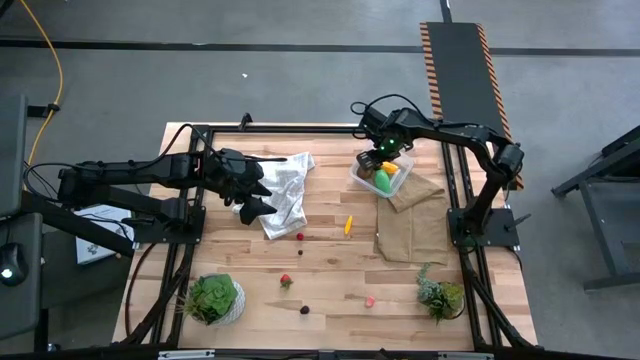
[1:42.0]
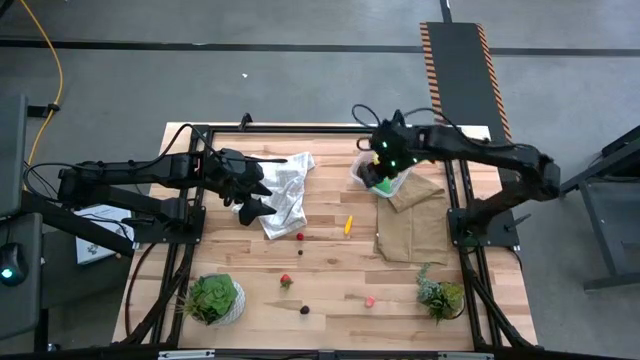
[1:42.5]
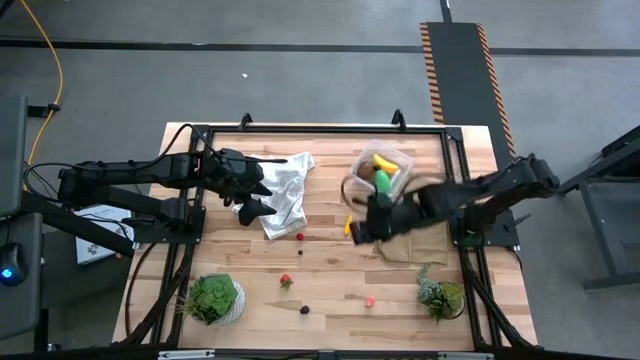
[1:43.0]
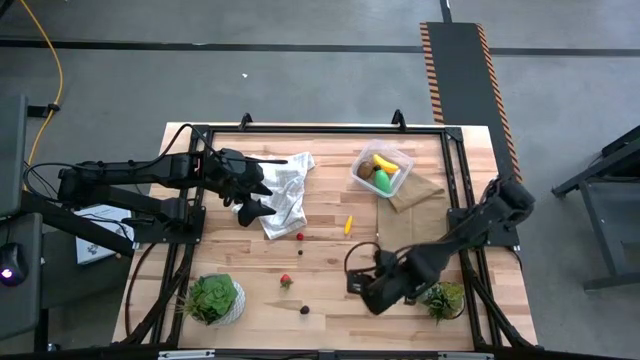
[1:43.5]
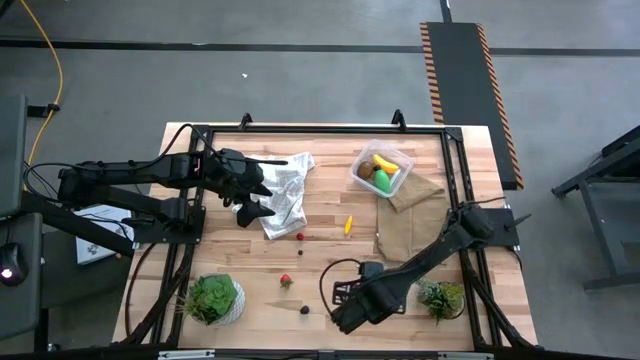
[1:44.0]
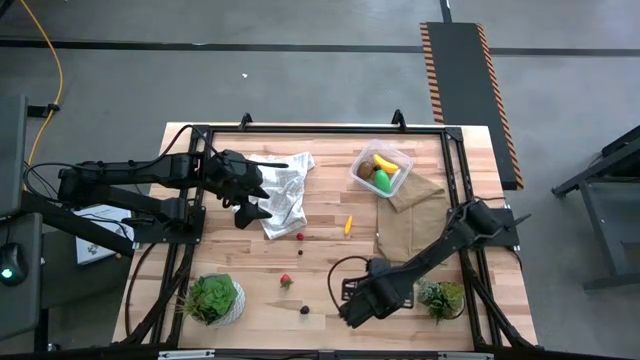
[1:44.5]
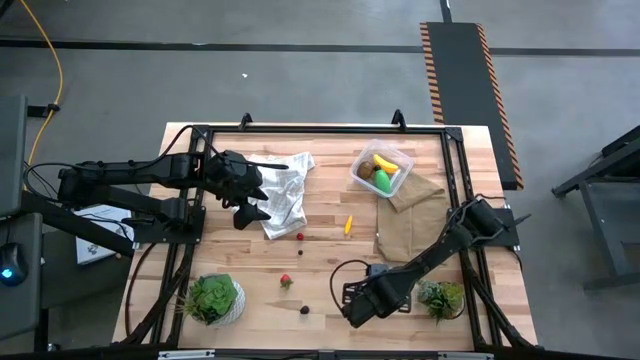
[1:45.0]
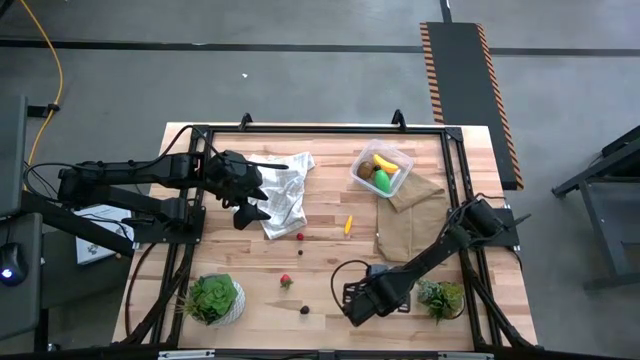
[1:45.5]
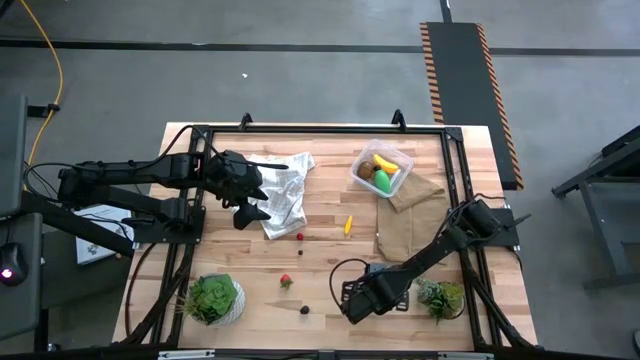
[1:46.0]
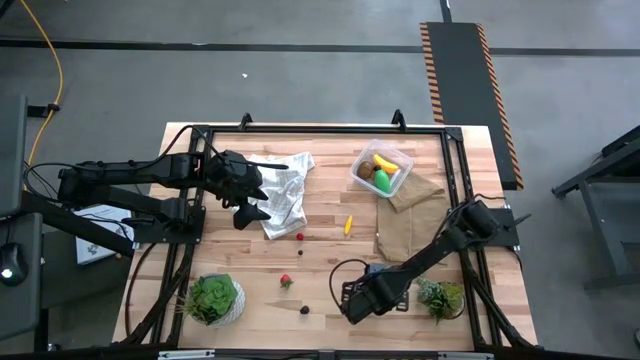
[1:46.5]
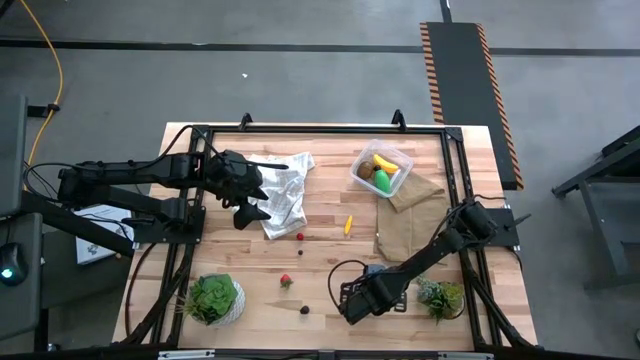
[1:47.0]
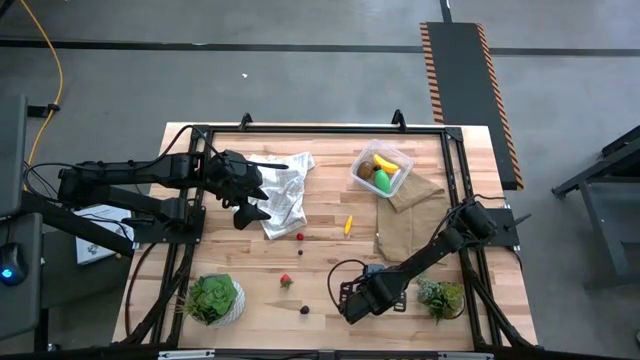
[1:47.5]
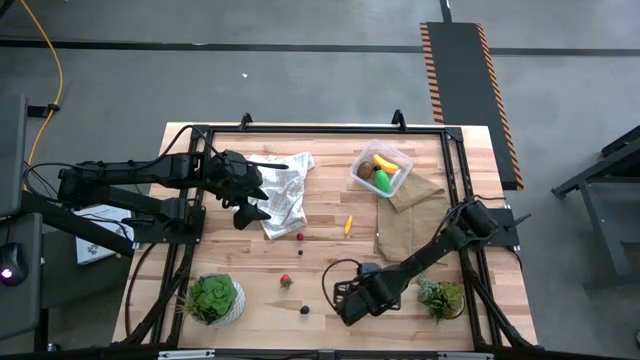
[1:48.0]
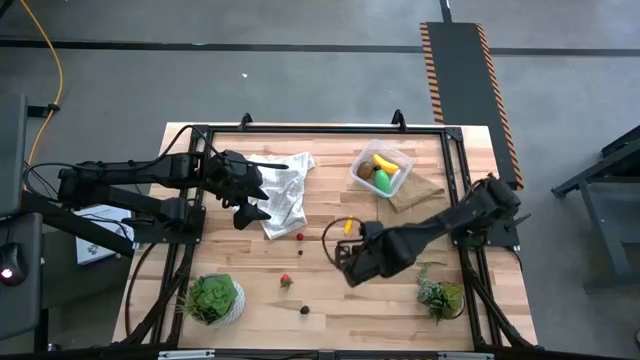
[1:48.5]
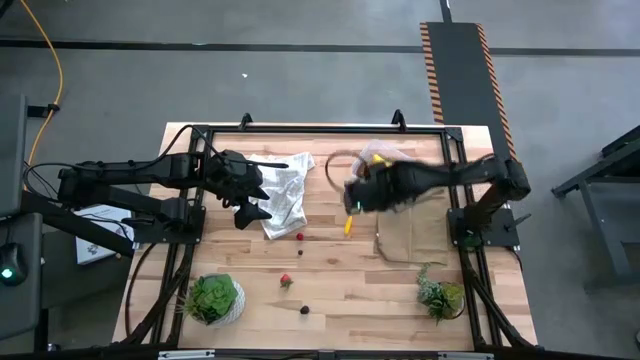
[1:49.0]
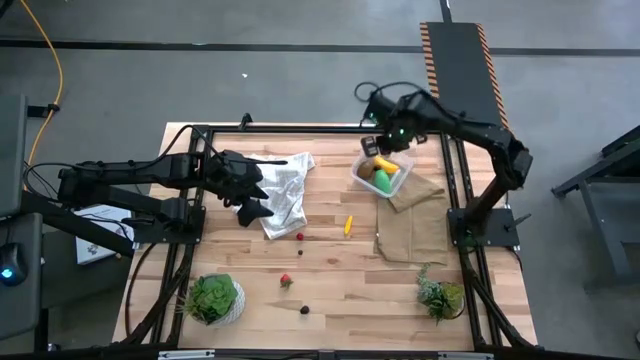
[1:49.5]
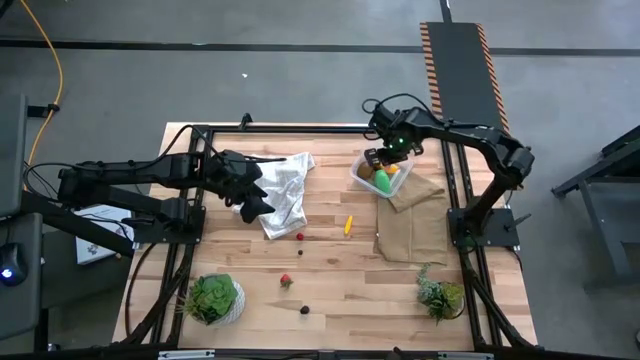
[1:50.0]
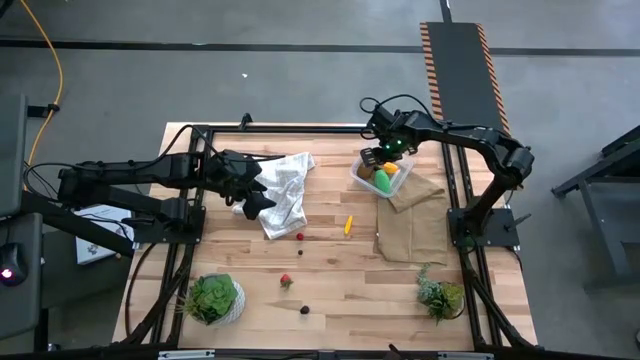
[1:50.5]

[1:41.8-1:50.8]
Task: Pick and placing Produce into tupperware
Put the pink peach into the transparent bin

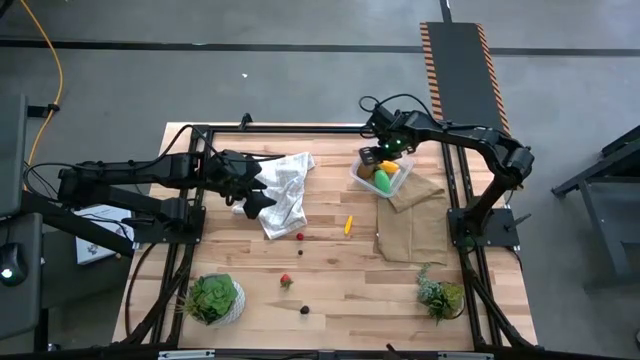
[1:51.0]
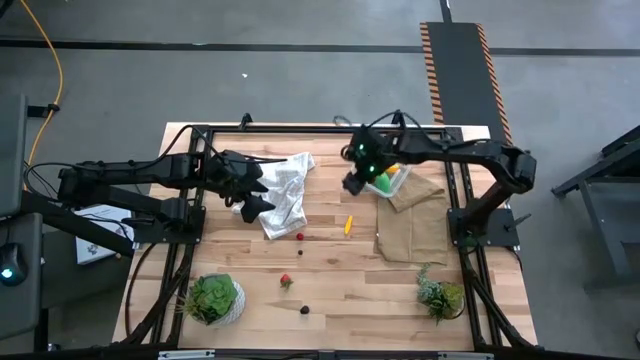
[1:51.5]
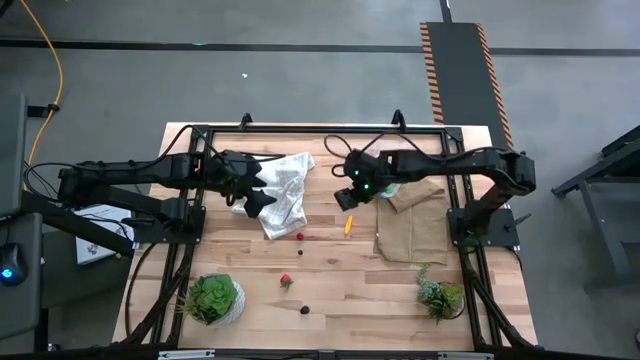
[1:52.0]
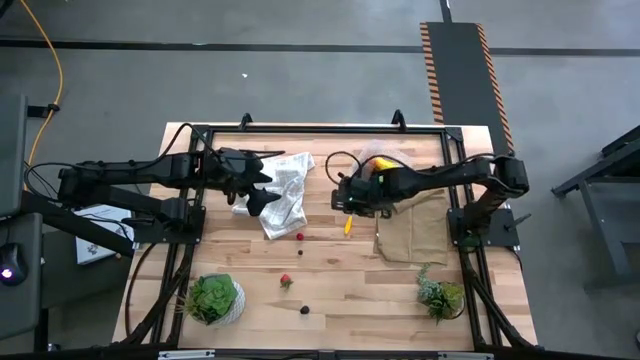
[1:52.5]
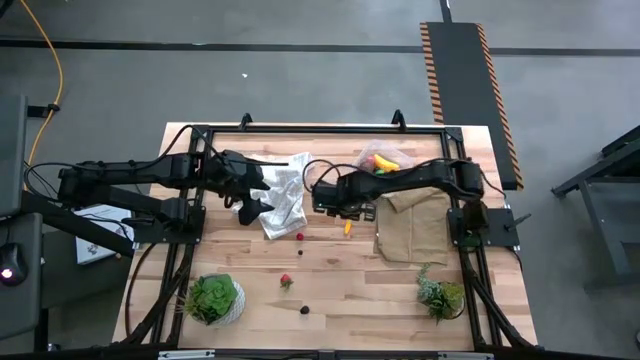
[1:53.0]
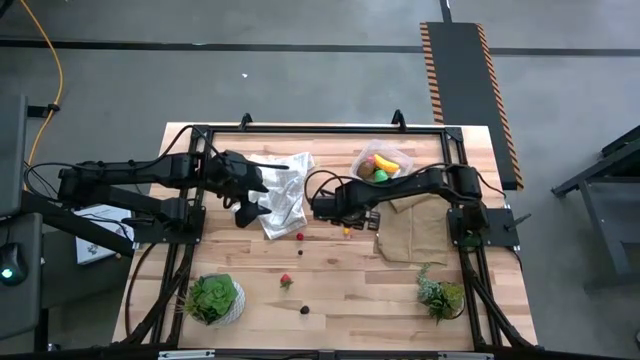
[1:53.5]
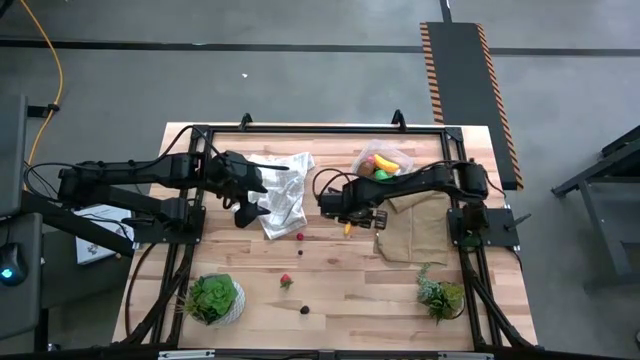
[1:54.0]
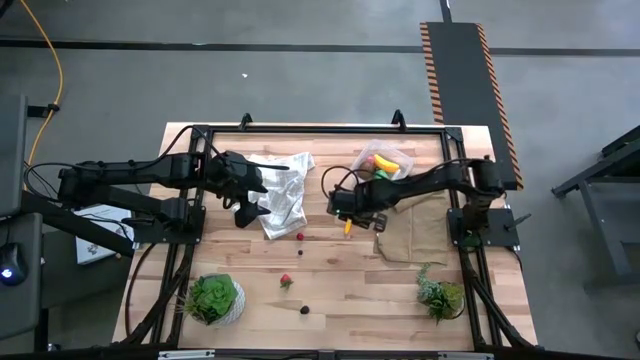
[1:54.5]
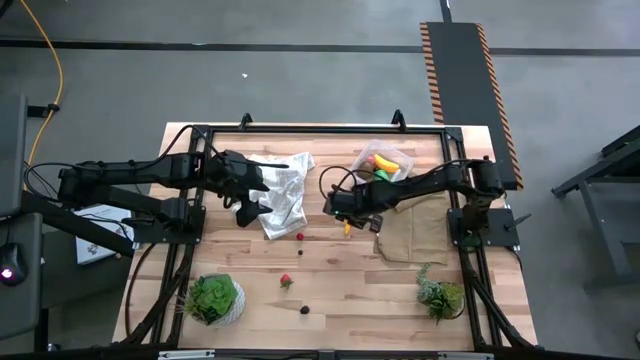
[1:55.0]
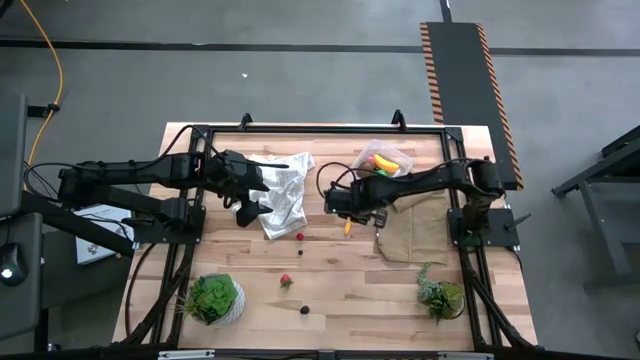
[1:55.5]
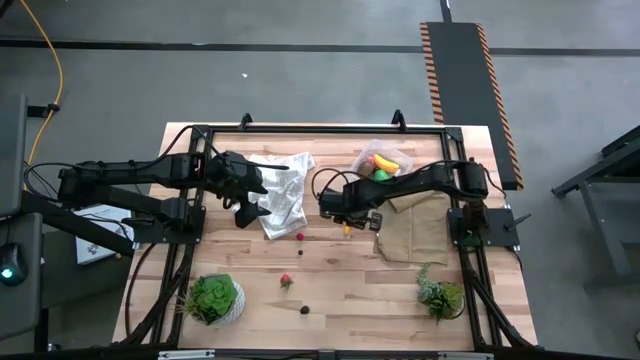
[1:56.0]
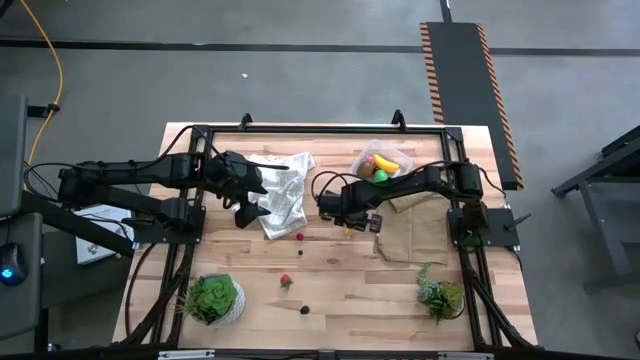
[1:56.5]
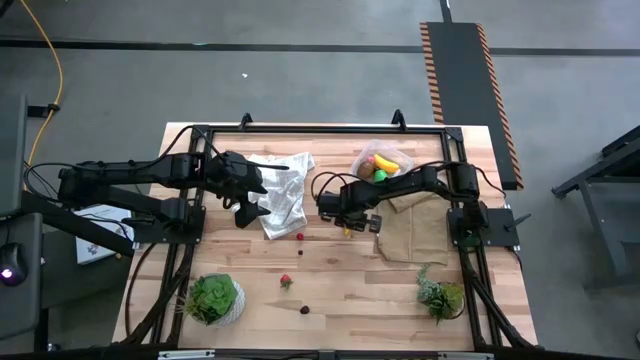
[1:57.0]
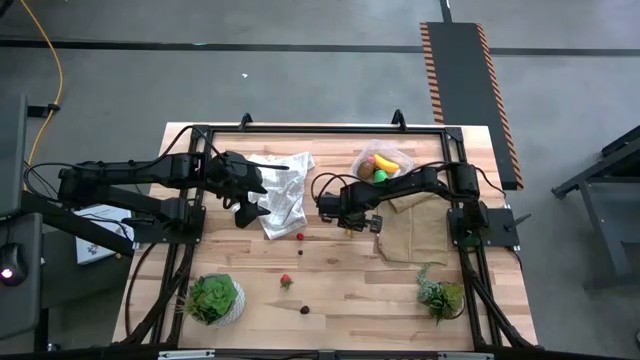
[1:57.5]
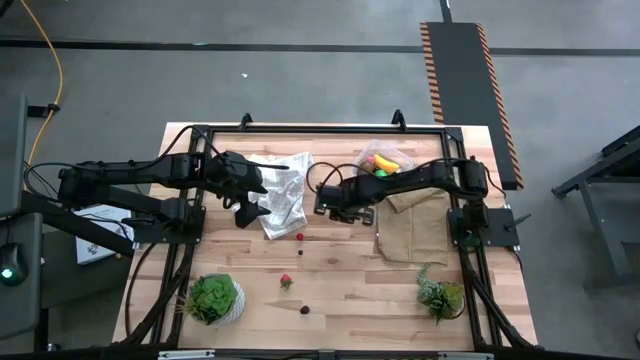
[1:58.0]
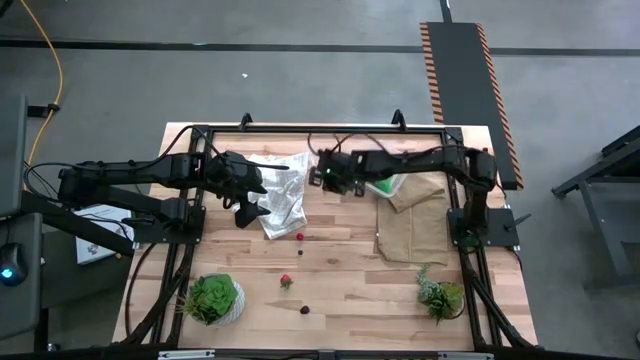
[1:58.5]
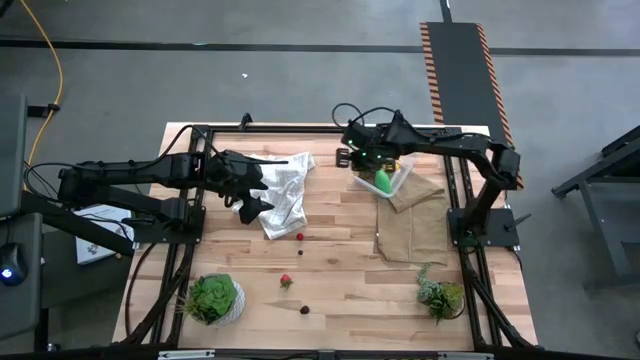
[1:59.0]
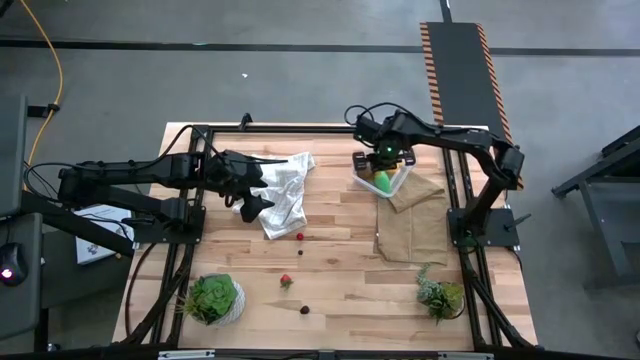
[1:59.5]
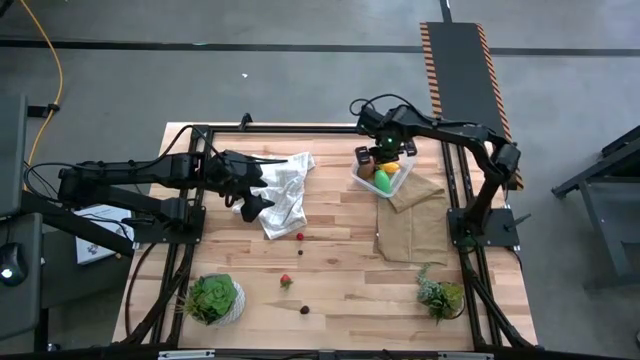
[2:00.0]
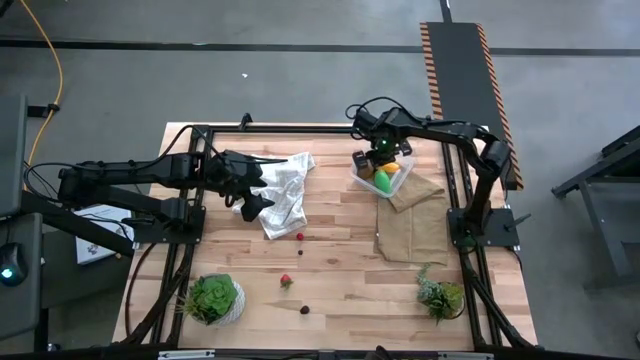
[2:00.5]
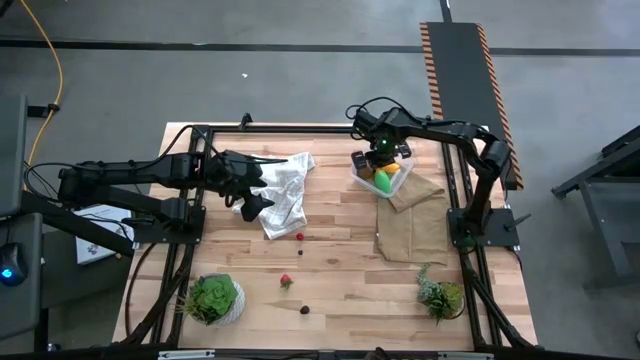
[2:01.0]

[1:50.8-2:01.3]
Put the yellow corn into the transparent bin
